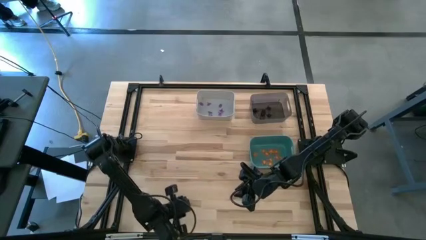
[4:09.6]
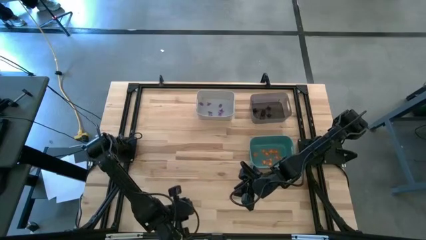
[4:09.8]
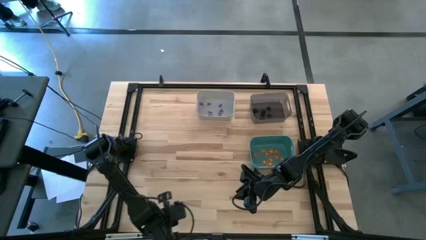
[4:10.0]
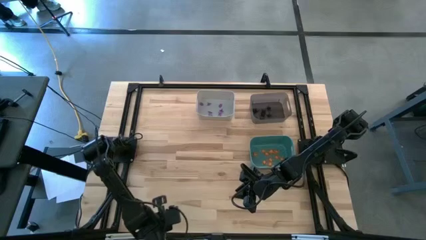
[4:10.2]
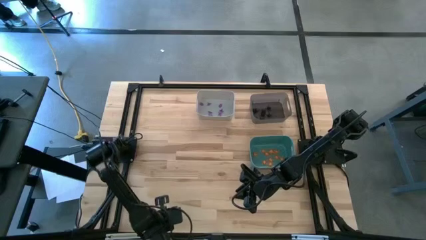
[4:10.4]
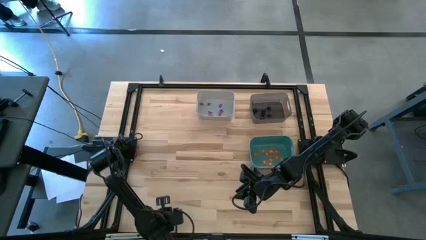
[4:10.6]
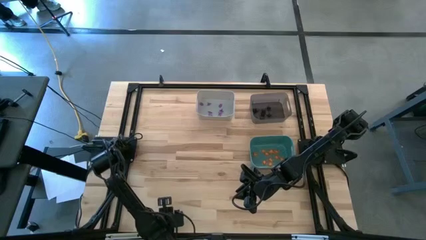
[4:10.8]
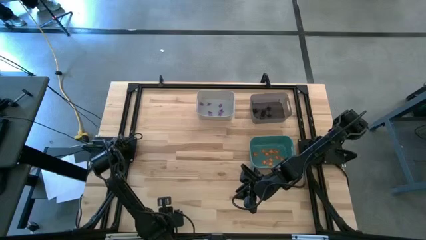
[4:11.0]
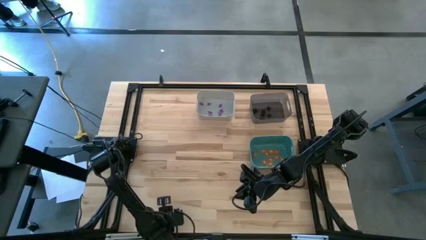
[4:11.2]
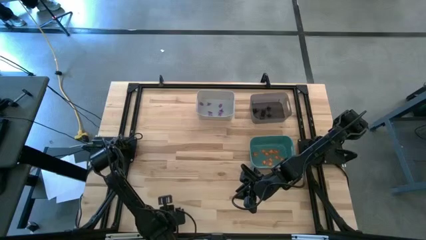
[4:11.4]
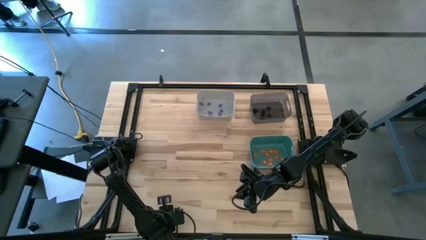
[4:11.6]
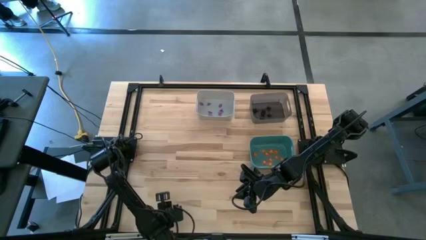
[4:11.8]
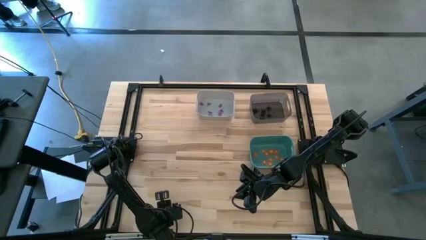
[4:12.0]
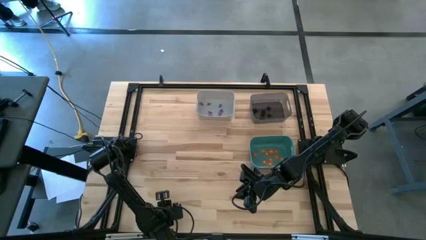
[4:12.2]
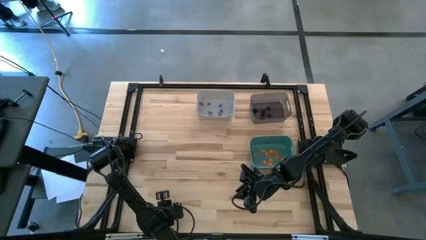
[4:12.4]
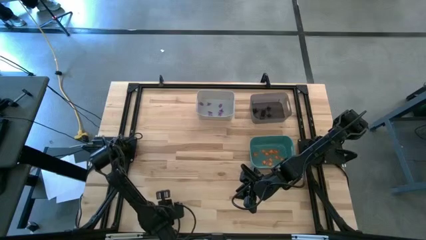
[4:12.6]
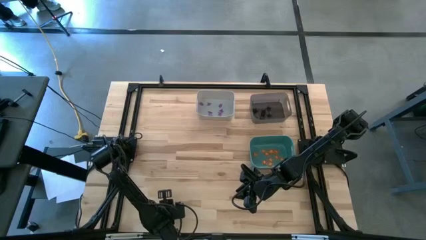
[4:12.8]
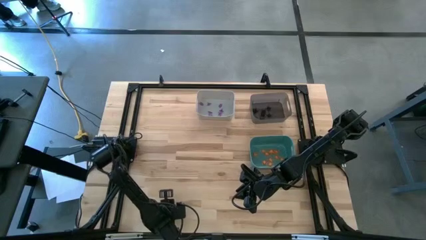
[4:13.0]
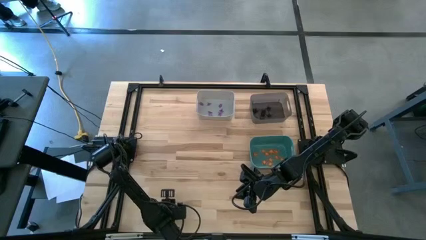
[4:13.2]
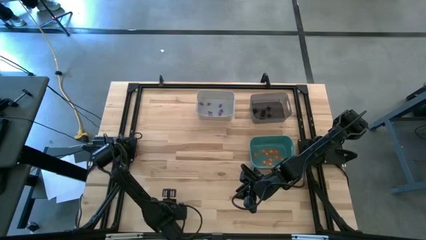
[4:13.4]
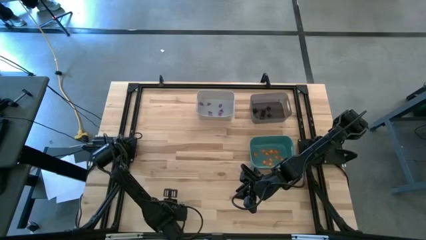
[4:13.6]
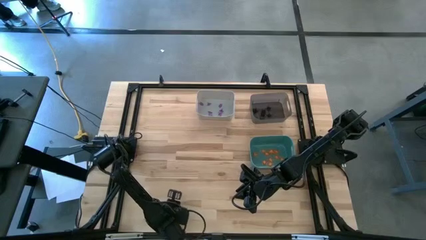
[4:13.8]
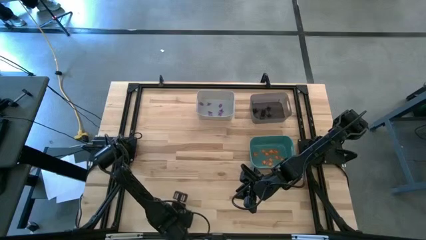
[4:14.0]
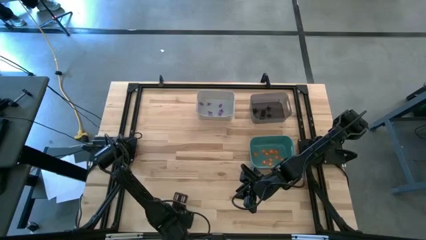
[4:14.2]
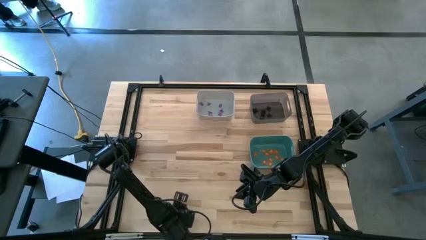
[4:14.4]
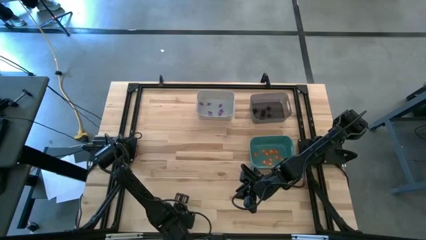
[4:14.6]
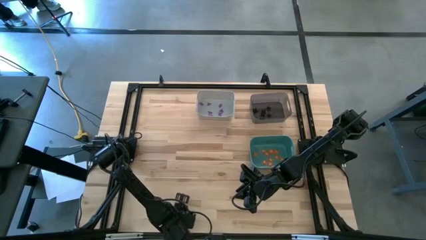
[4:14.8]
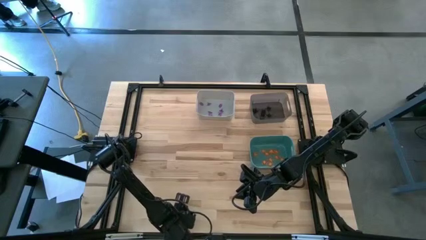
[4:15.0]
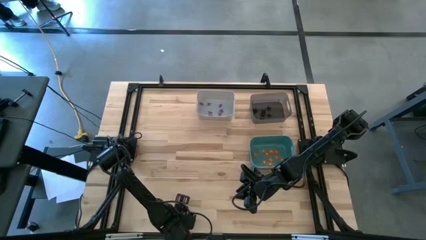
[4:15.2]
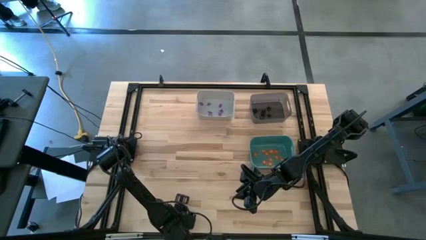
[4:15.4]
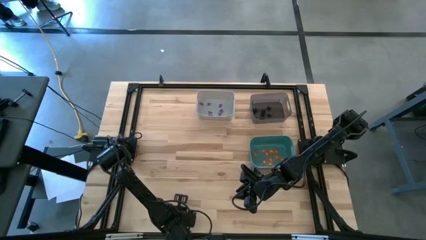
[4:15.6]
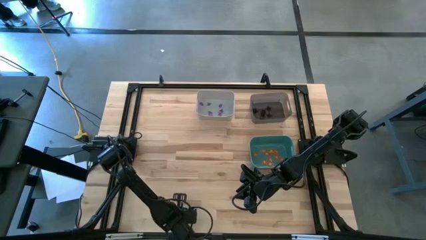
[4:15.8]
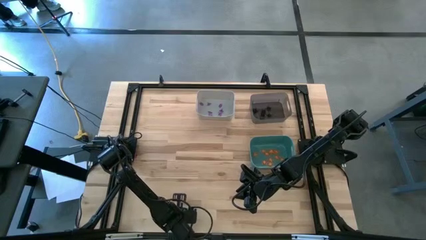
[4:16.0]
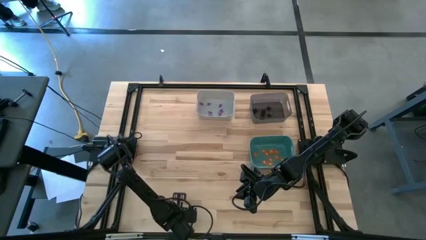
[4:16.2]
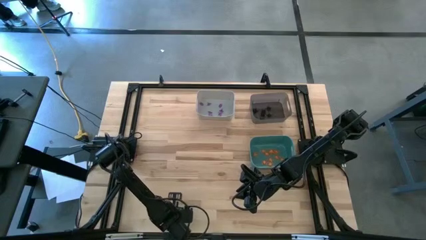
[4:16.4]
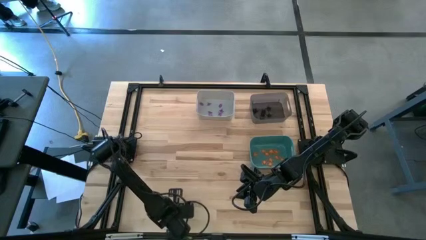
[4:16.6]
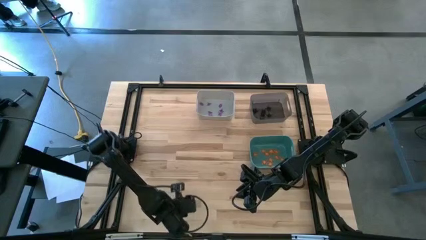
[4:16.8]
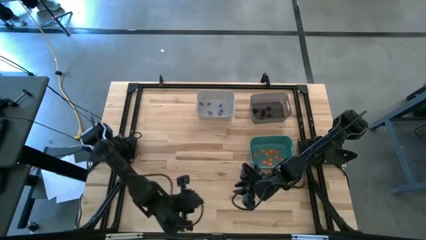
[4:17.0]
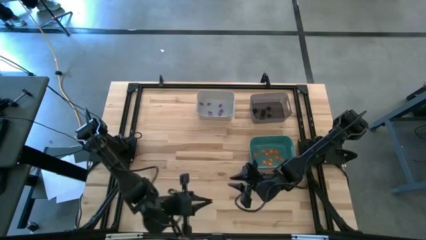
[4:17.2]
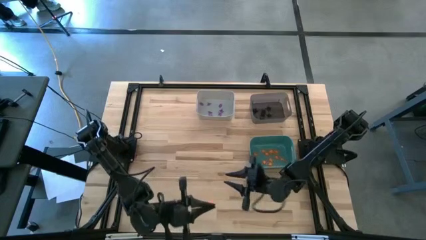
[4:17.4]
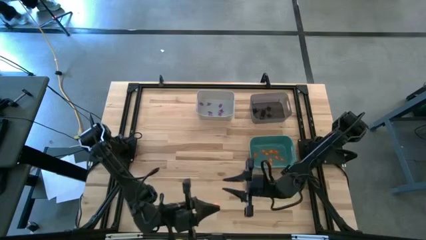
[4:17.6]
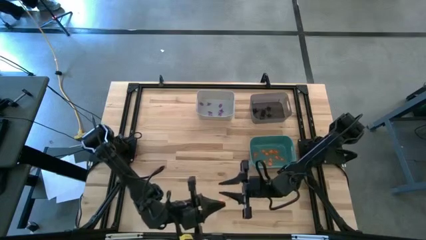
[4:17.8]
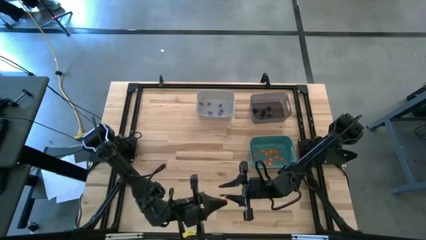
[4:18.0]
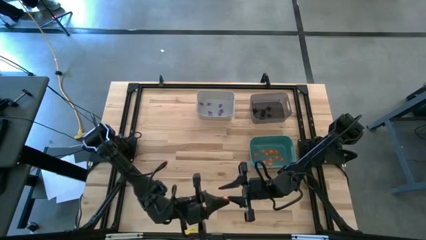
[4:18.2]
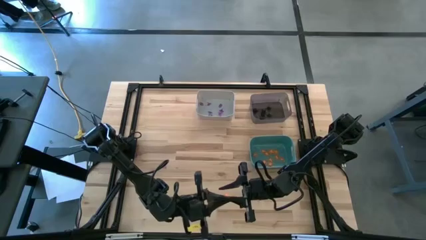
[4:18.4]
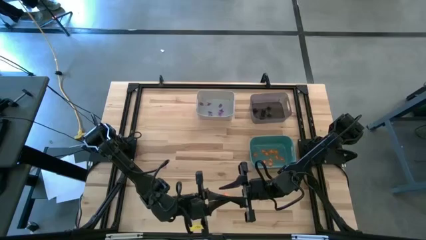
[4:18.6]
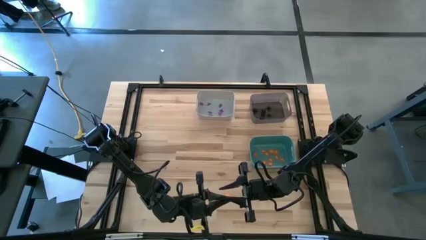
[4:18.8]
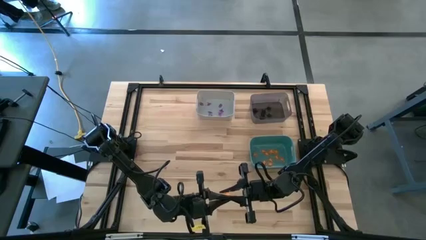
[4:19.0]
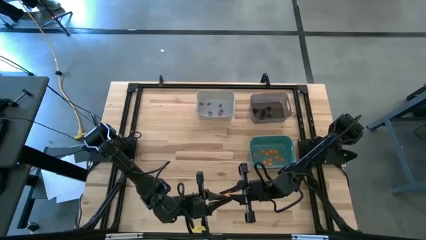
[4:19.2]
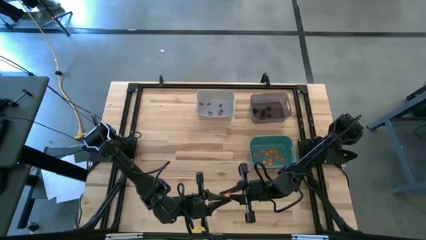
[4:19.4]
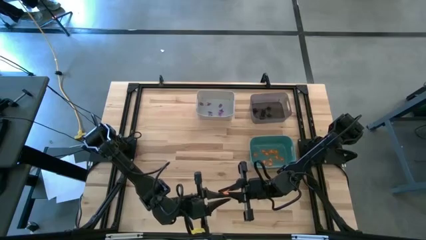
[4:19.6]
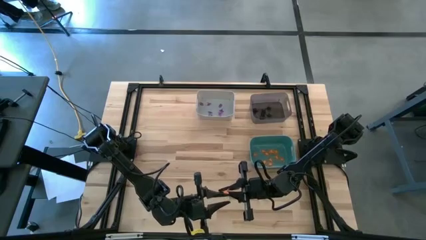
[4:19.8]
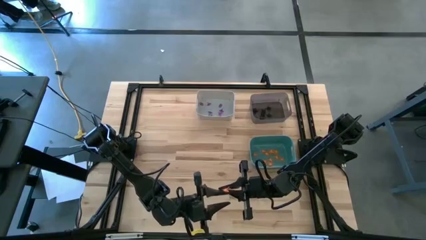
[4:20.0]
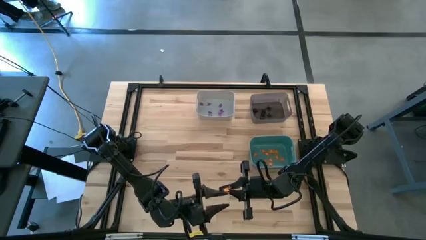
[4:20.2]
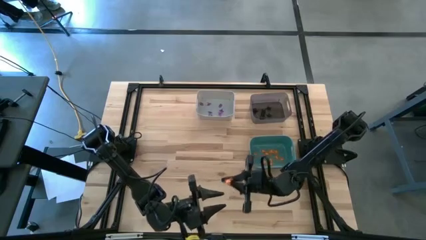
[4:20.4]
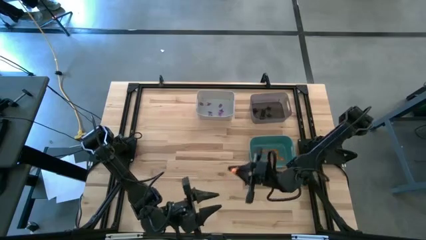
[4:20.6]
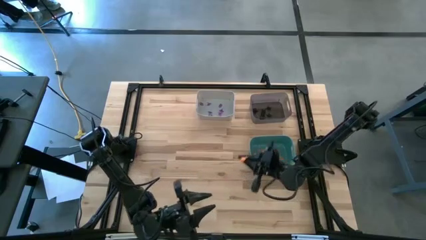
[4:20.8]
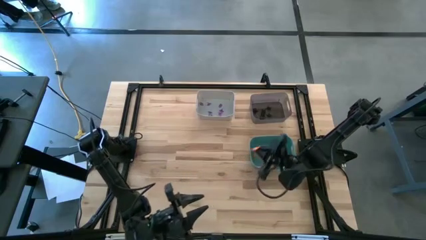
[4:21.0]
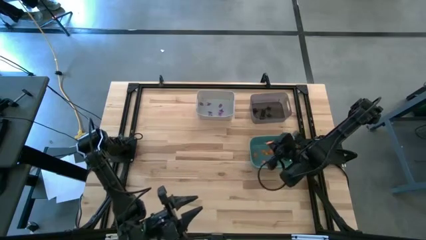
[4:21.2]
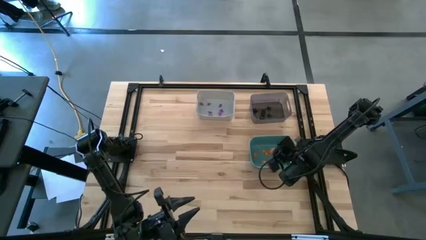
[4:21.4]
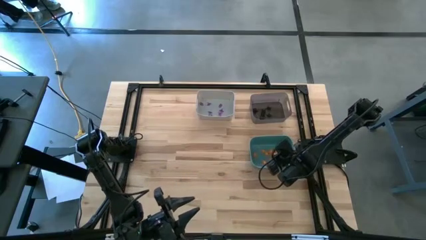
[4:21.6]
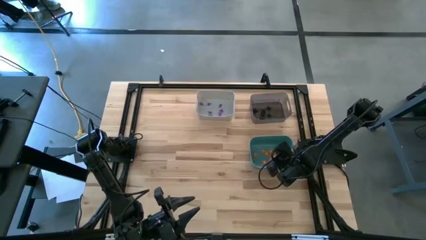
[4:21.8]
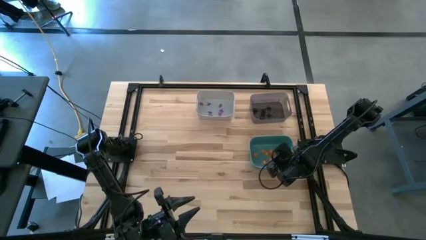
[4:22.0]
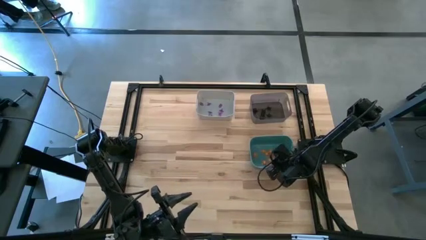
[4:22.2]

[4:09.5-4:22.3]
Task: Sort Halloween decoration
Put the orange spider toy into the green bin

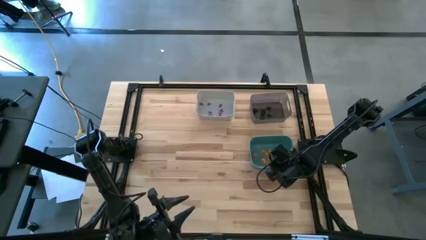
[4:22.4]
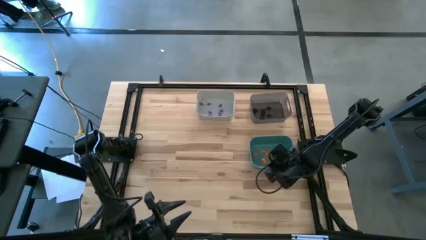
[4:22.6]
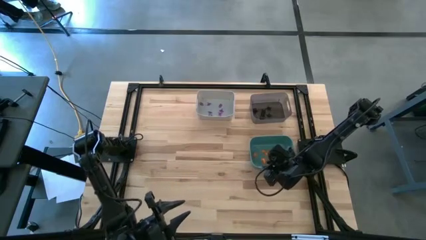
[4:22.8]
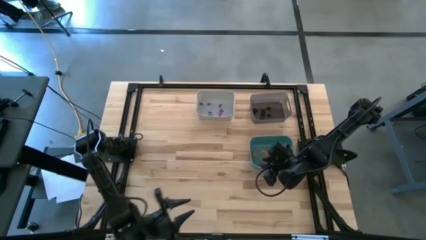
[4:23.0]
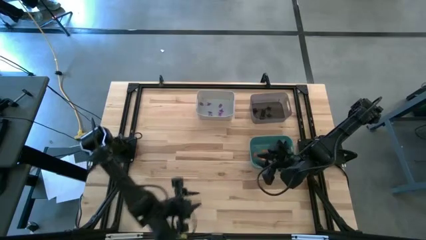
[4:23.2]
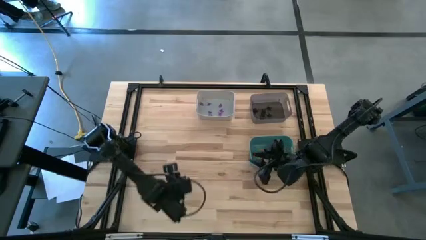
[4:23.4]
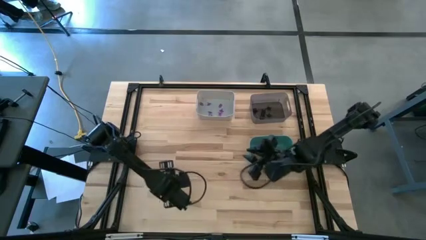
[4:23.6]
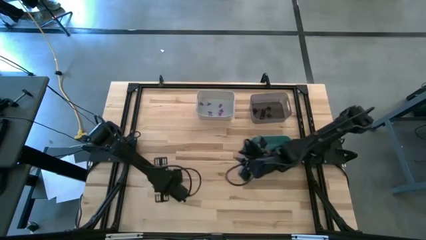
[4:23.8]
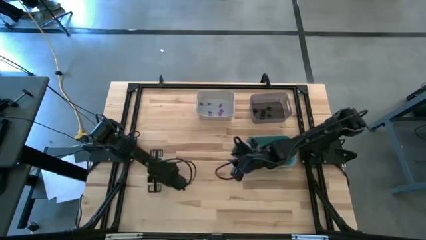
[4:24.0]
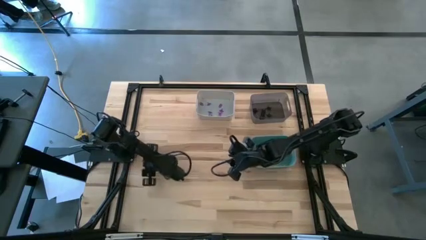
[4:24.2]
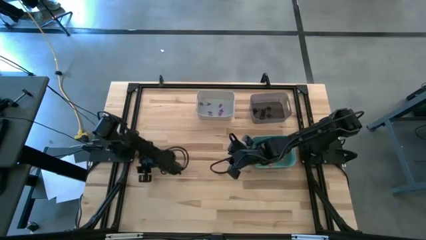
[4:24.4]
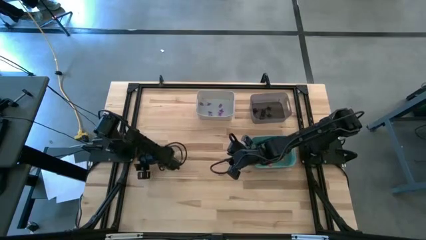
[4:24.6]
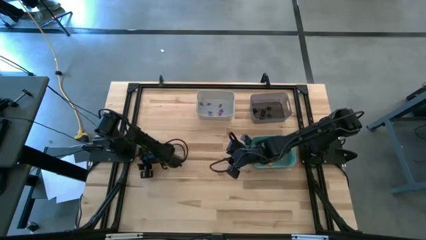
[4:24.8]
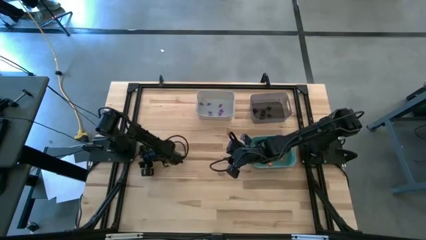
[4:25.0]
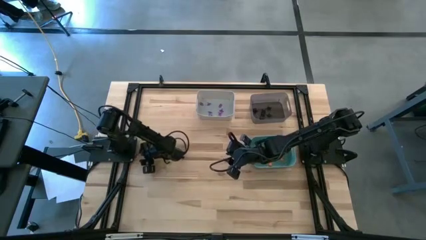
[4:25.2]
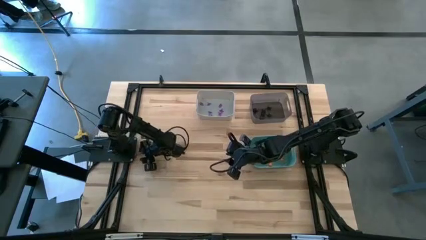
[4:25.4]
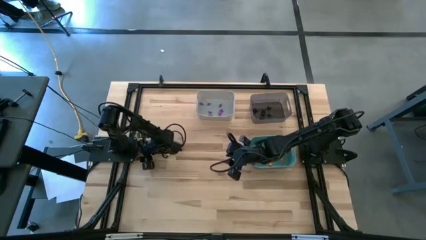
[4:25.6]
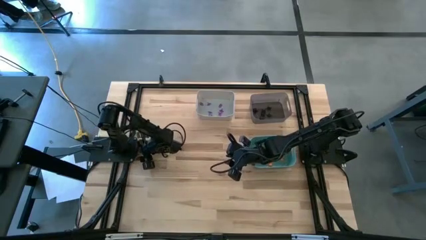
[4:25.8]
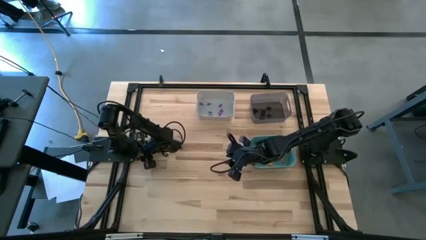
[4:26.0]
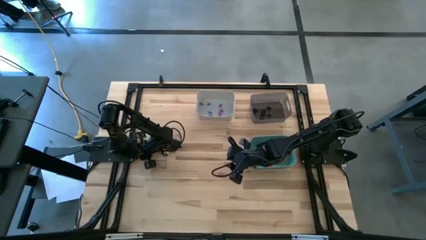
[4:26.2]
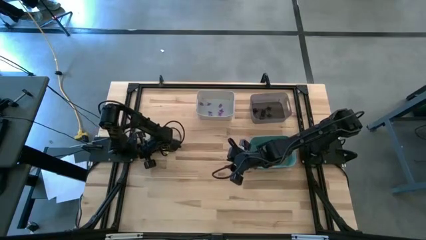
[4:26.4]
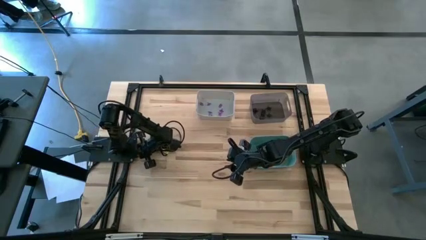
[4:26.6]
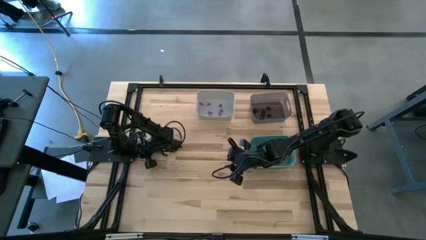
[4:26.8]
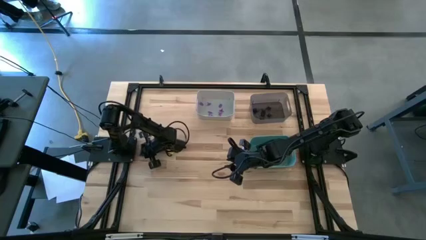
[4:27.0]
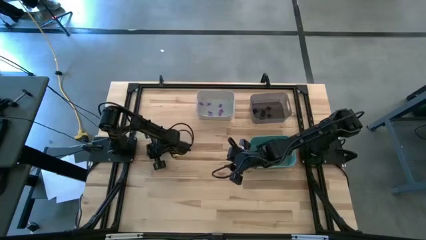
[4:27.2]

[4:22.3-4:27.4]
Put the purple witch hat toy into the white bin
